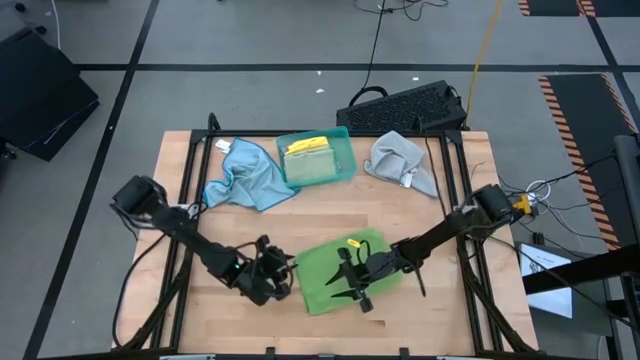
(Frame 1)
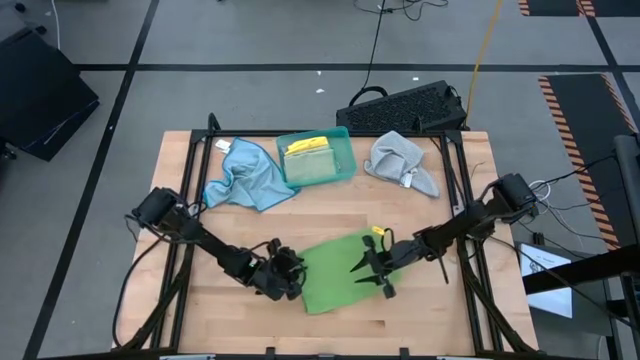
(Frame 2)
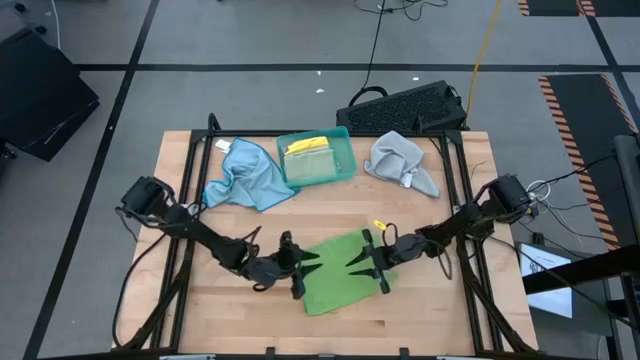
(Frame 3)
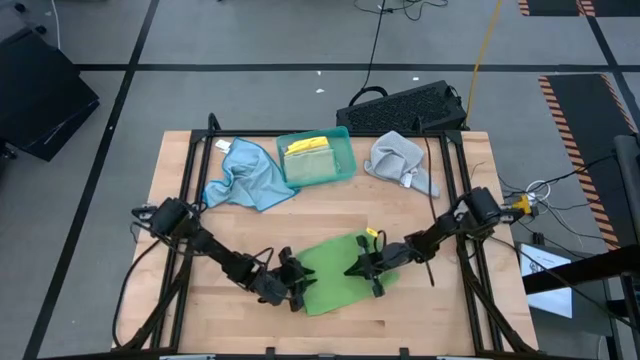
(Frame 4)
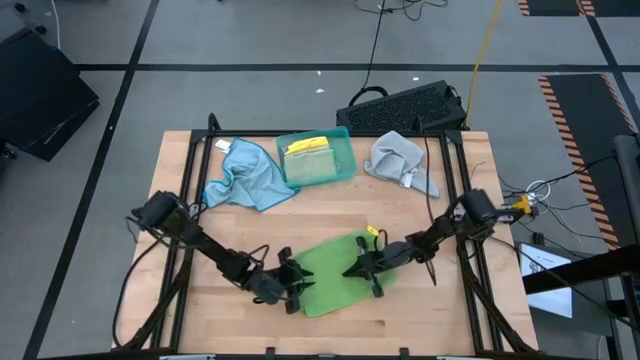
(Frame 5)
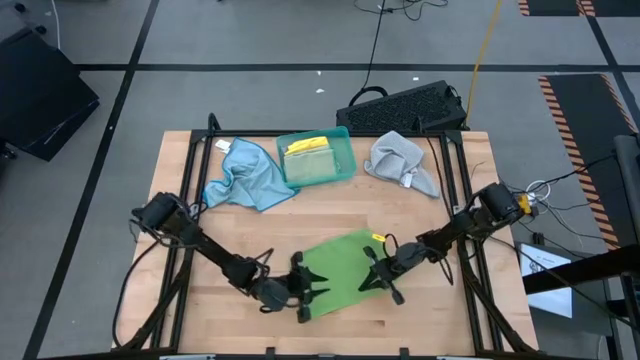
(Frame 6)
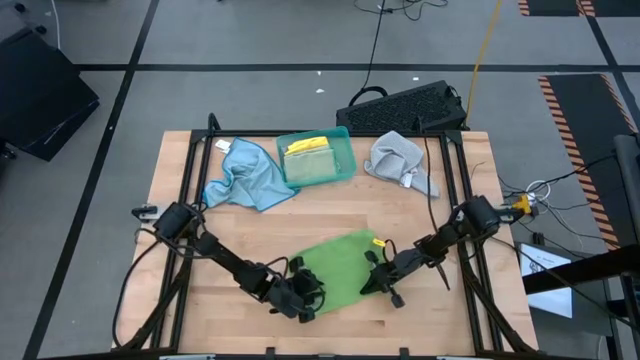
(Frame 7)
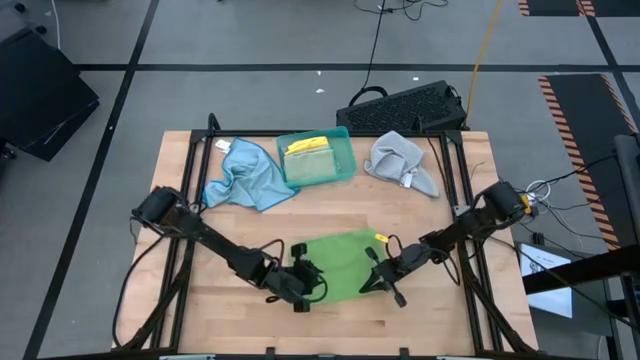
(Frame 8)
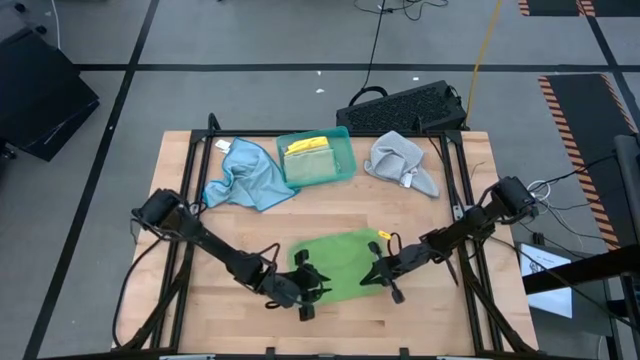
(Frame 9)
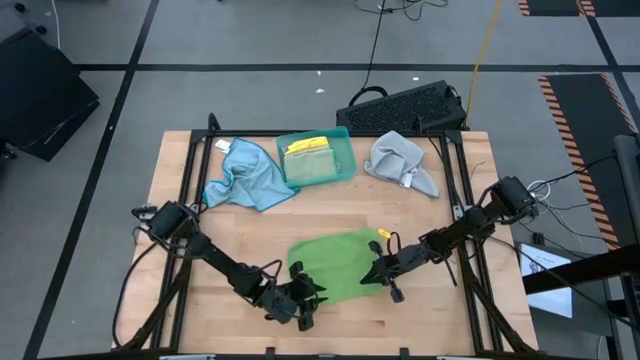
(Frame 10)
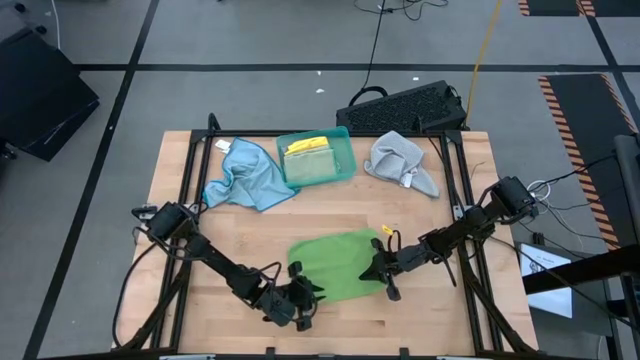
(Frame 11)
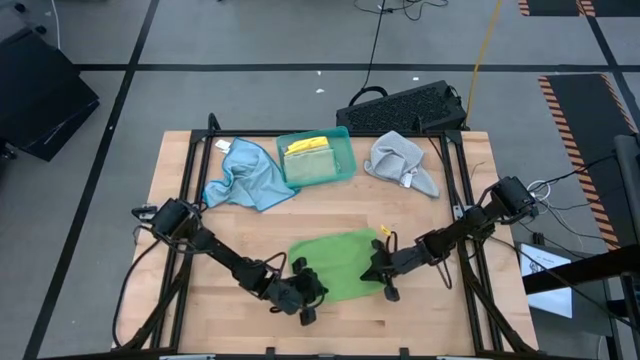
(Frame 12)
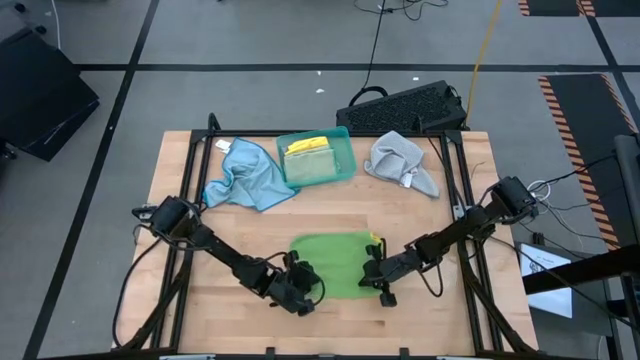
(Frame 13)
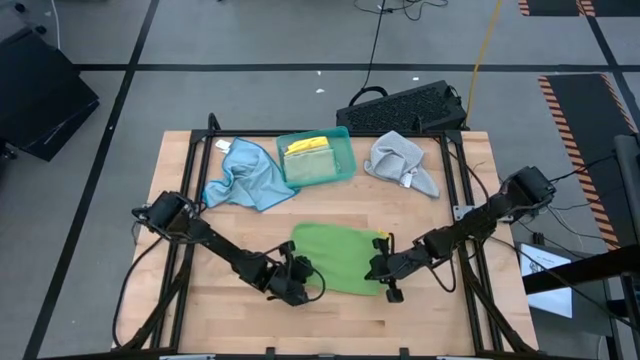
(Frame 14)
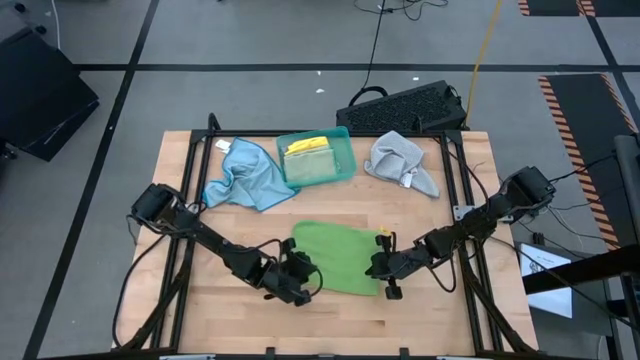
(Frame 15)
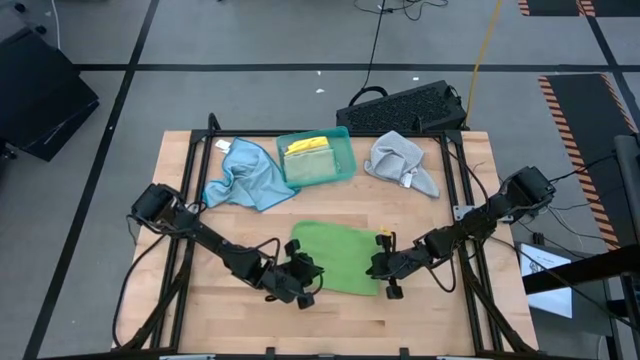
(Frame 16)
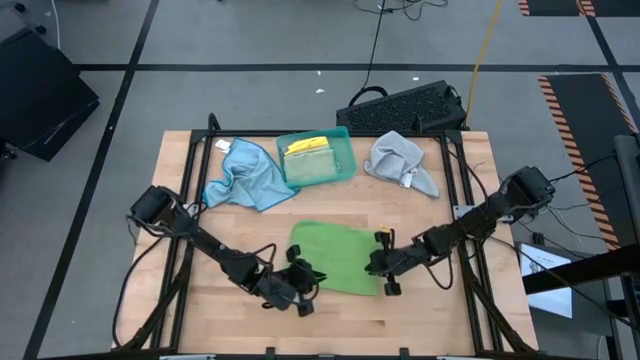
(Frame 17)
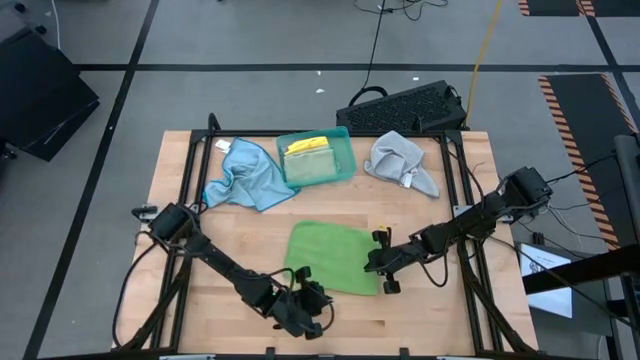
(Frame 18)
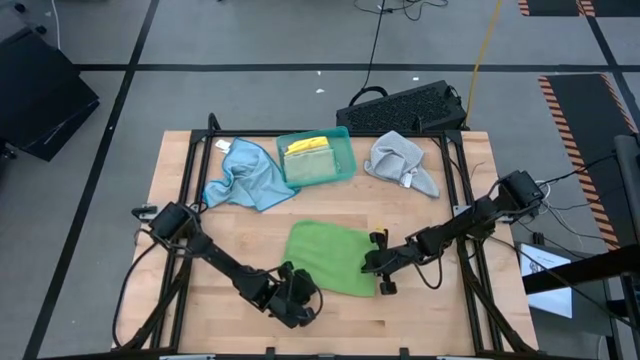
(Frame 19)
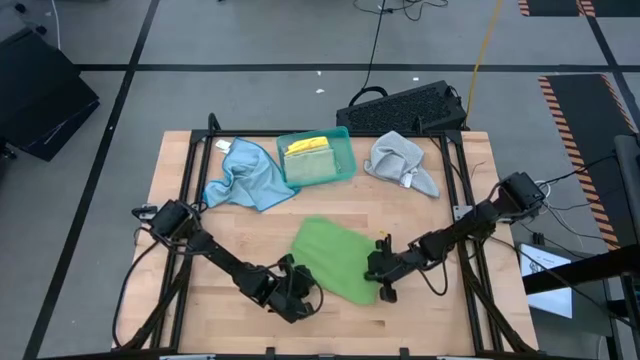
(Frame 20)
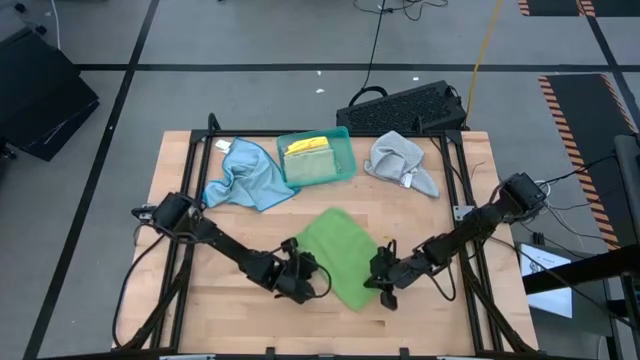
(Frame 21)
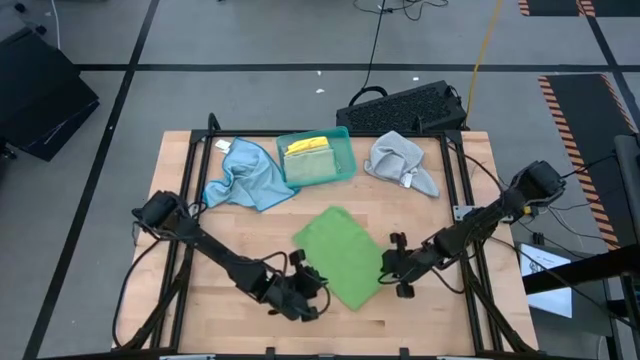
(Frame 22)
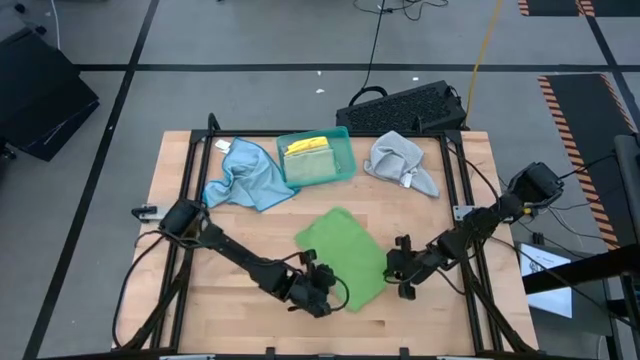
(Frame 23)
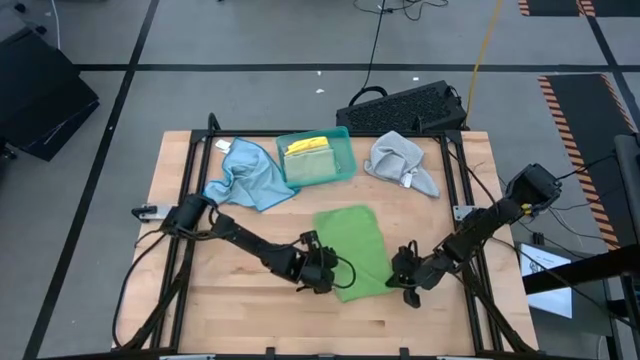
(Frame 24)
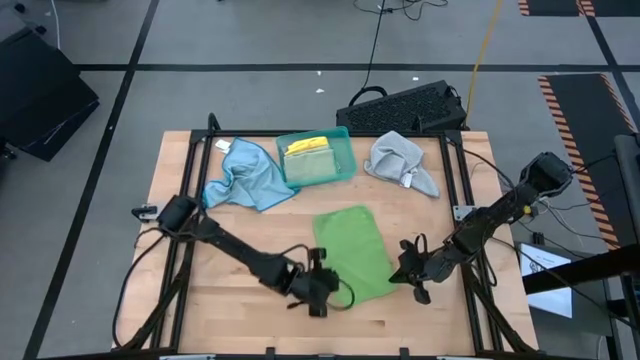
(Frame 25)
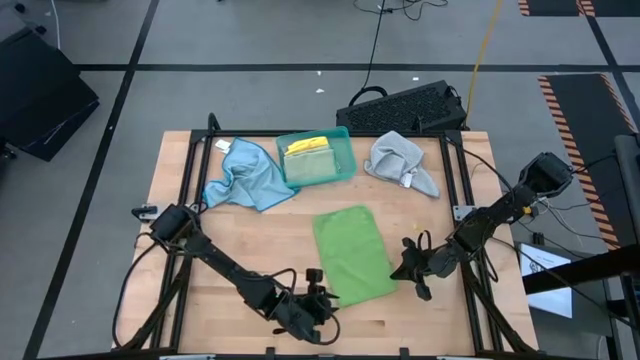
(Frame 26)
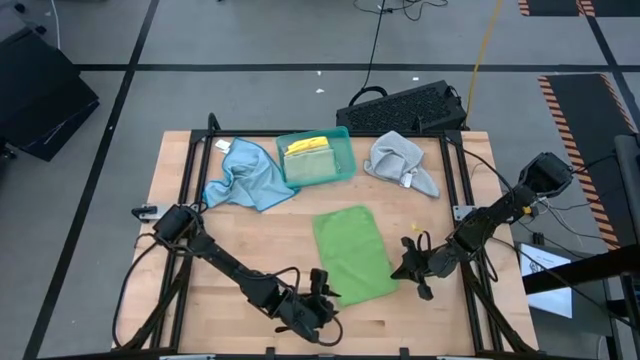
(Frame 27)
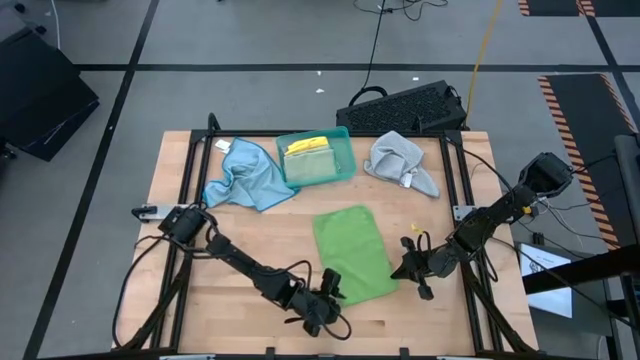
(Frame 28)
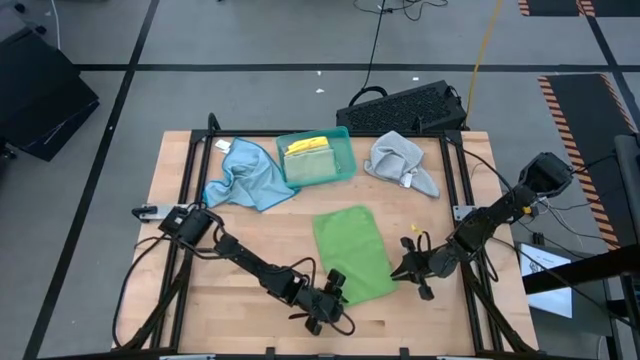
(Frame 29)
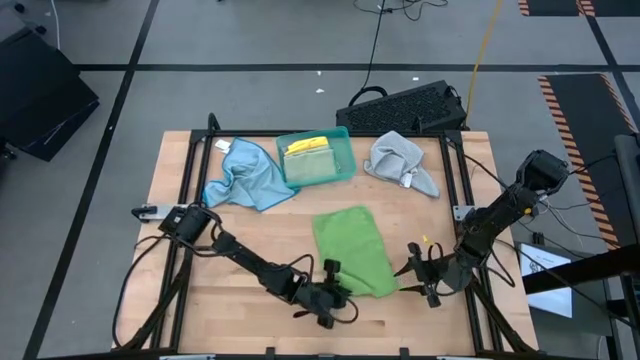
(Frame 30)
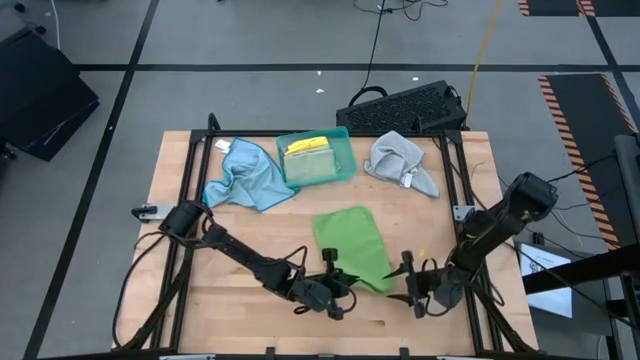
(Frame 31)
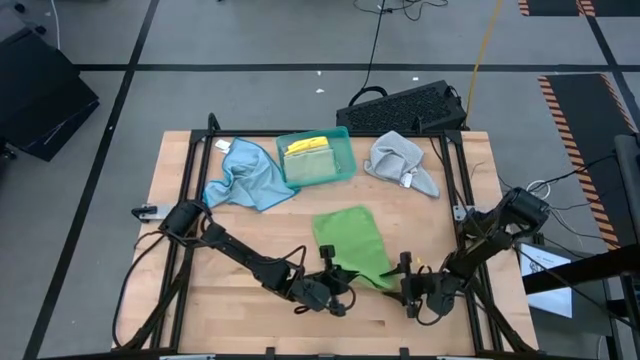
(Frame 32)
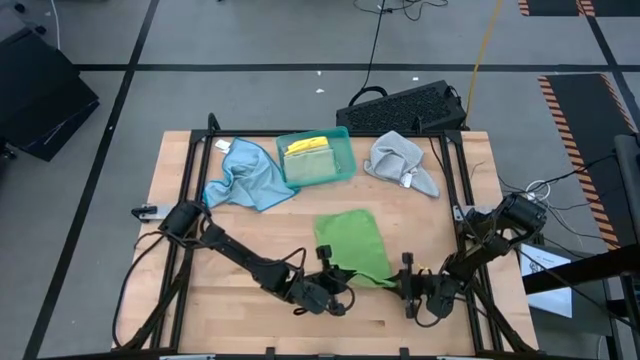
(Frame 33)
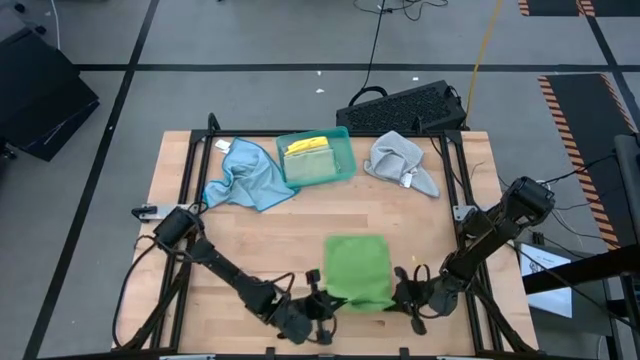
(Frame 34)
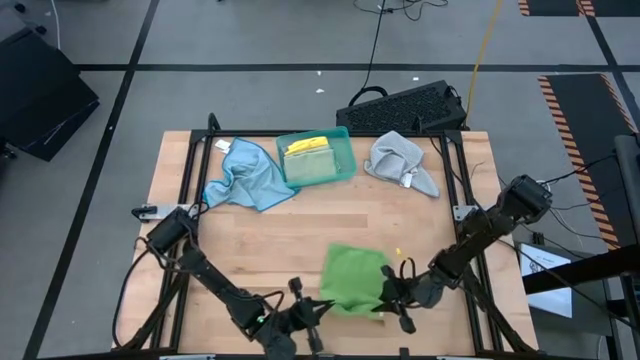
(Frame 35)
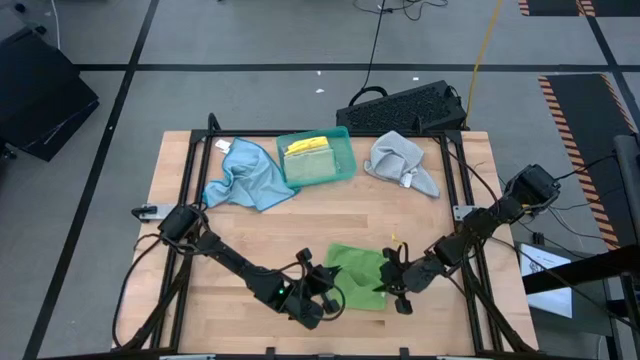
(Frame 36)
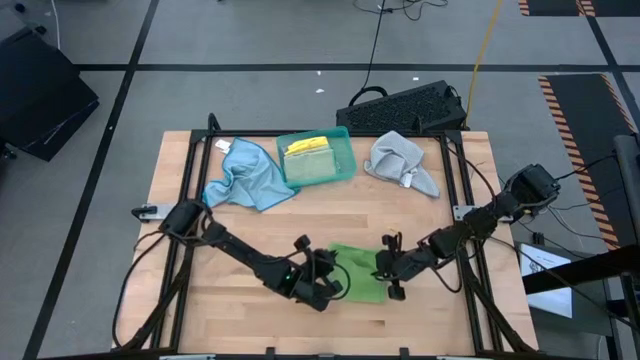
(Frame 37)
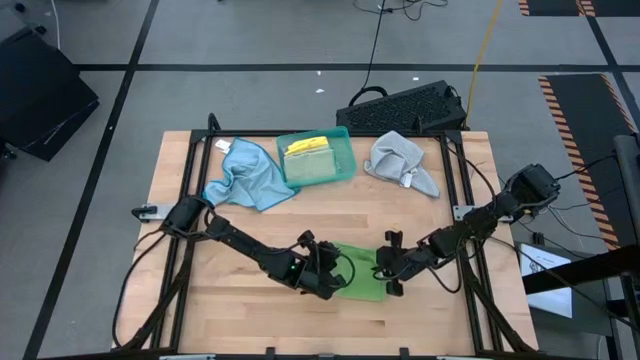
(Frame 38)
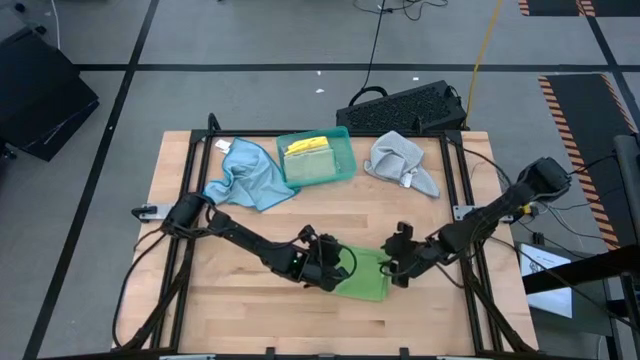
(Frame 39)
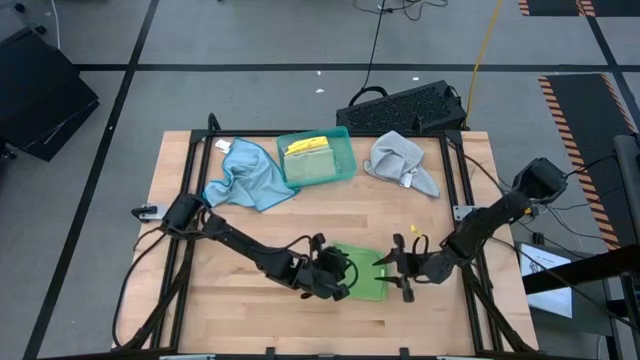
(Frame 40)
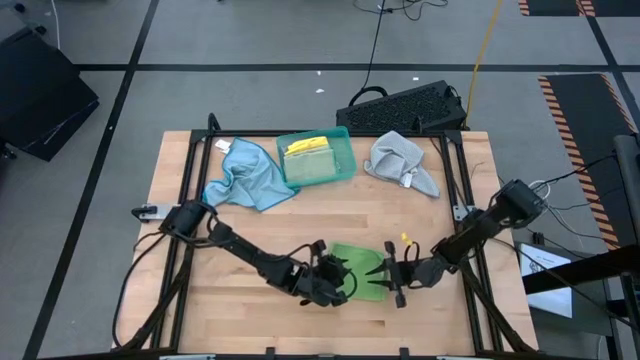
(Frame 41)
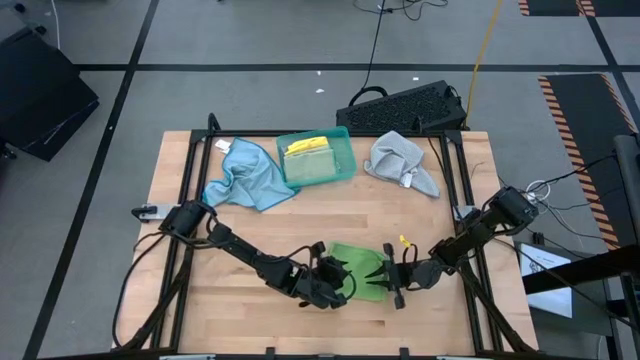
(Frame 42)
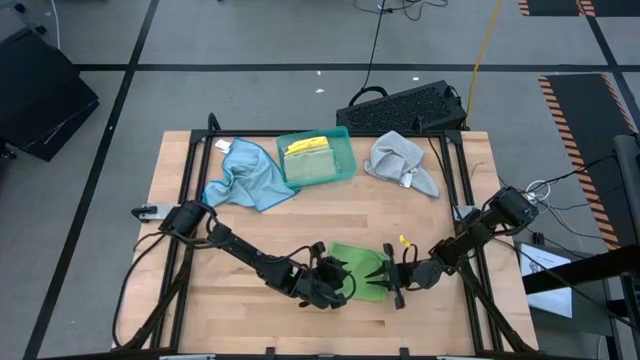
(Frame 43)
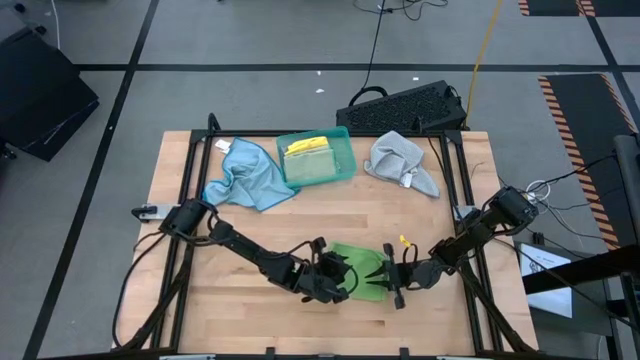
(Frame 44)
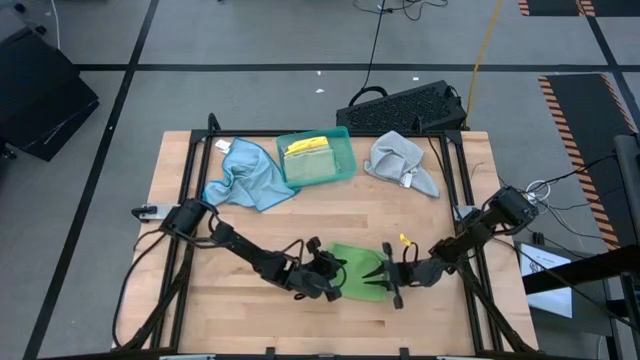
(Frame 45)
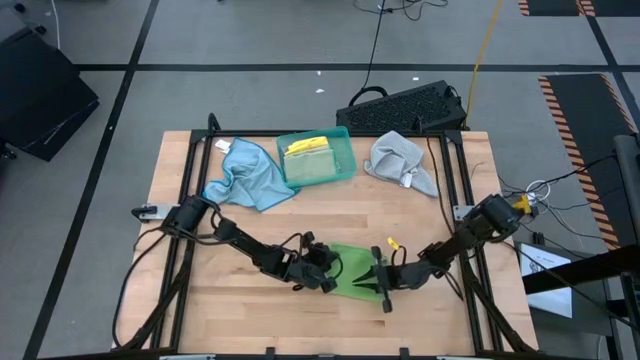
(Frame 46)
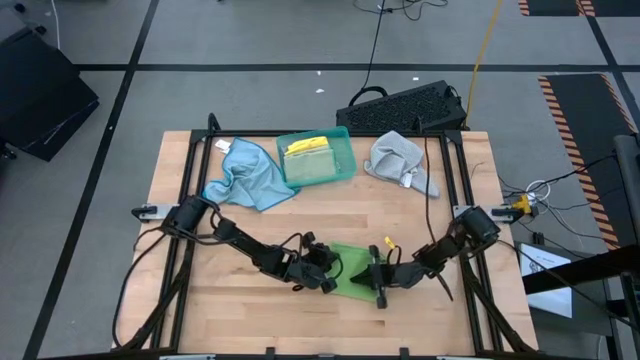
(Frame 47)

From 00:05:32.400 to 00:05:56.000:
Task: Fold microfiber towels
Fold the green microfiber cloth
